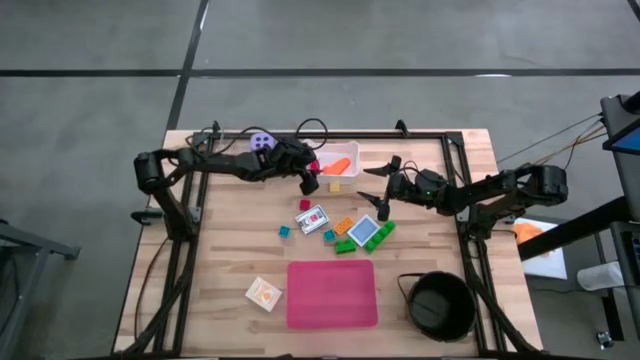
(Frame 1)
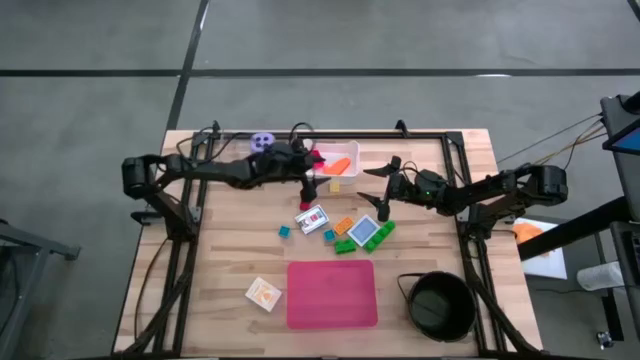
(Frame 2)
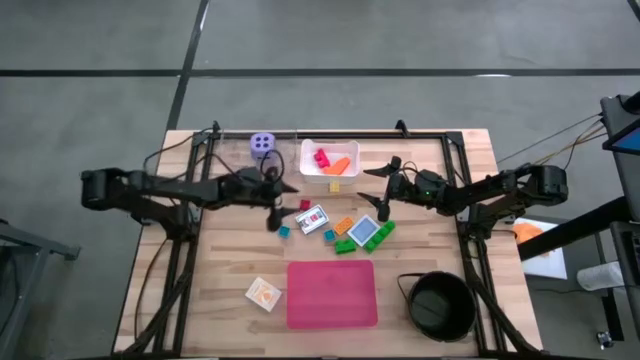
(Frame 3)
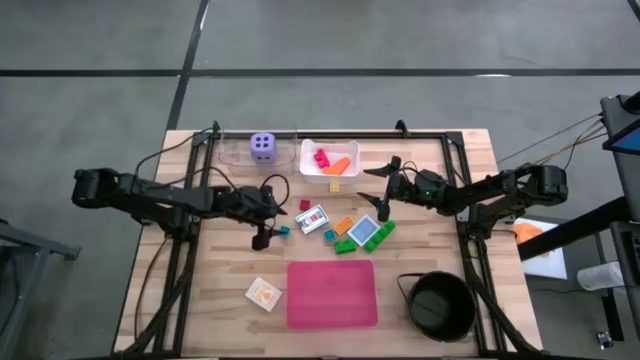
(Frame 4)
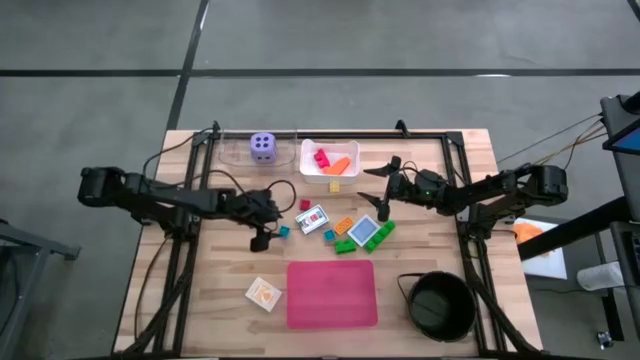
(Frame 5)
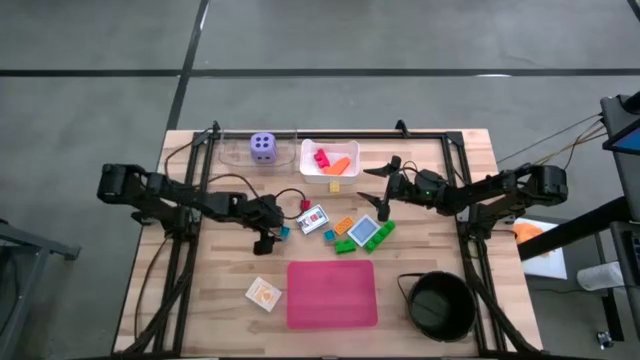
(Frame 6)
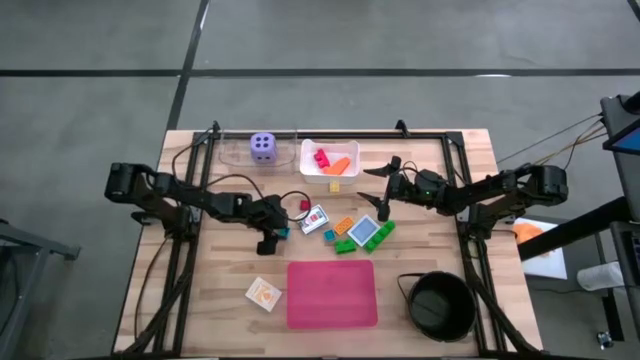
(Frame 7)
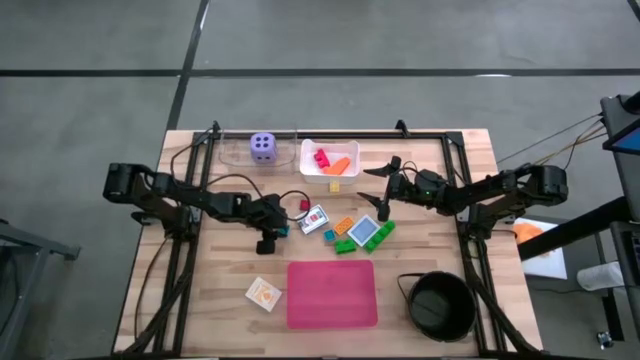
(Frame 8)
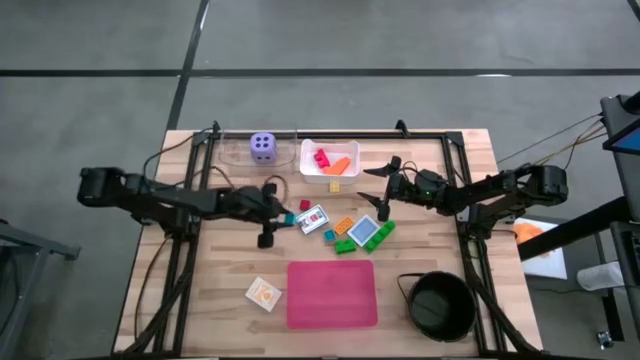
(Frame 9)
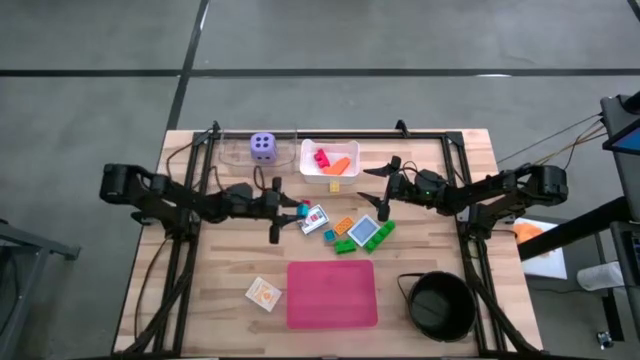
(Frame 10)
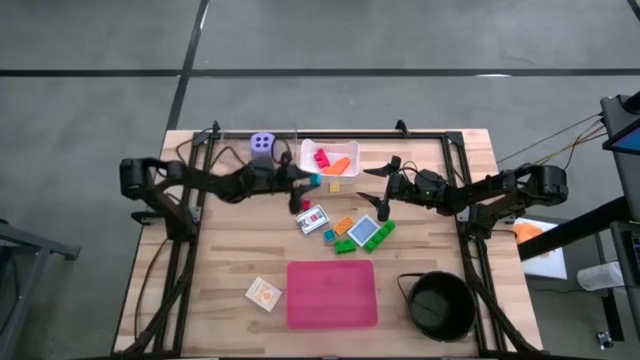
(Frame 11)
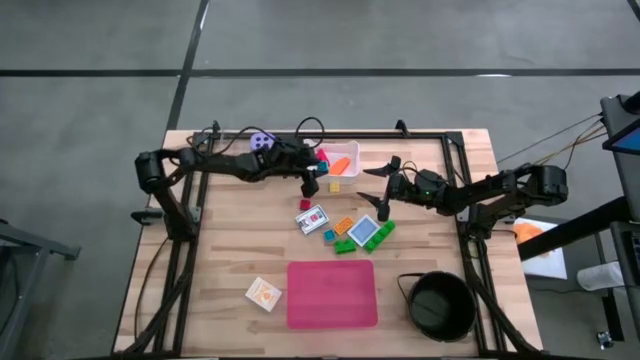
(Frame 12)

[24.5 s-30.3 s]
Task: Pick & Place Toys
Put the left blue four stud game piece into the white bin

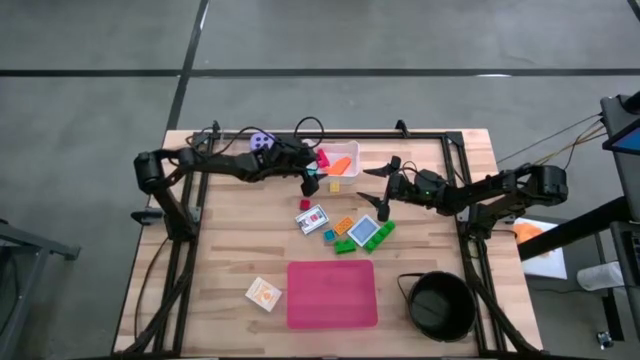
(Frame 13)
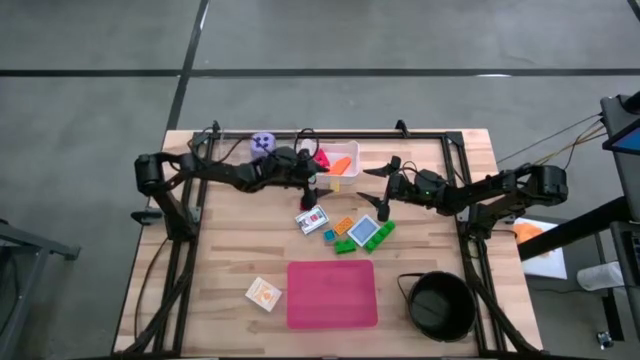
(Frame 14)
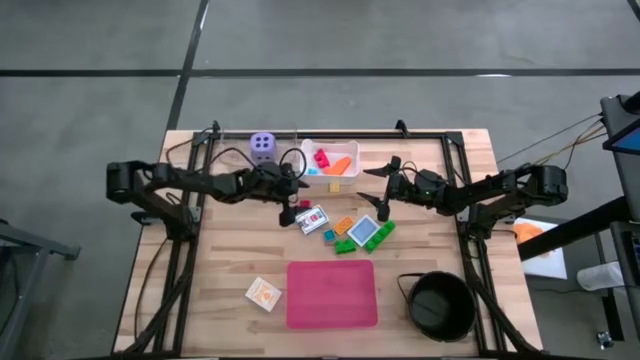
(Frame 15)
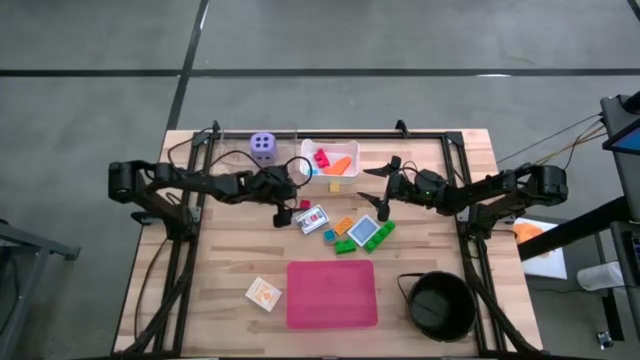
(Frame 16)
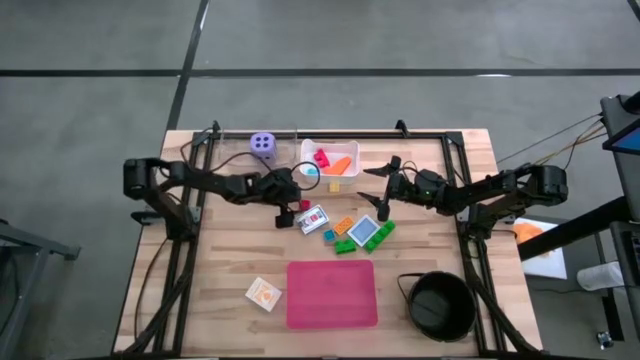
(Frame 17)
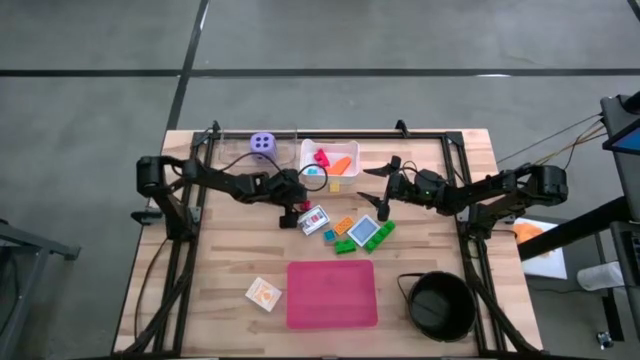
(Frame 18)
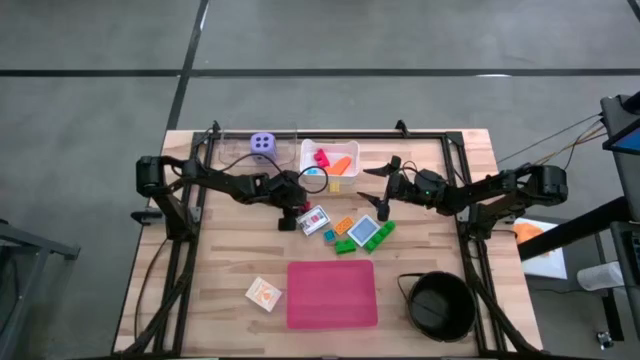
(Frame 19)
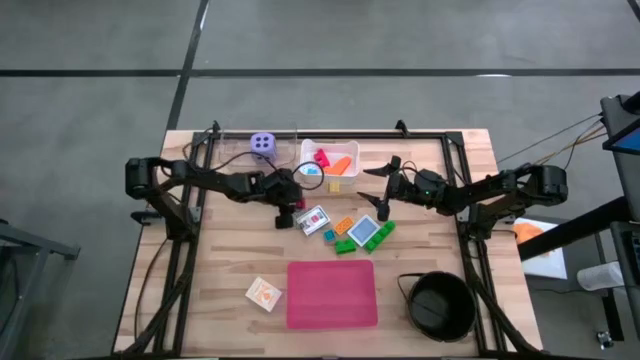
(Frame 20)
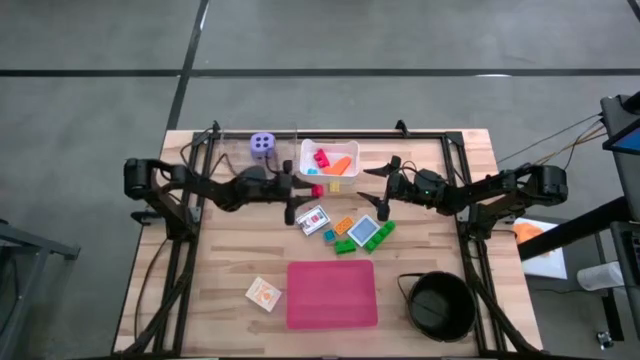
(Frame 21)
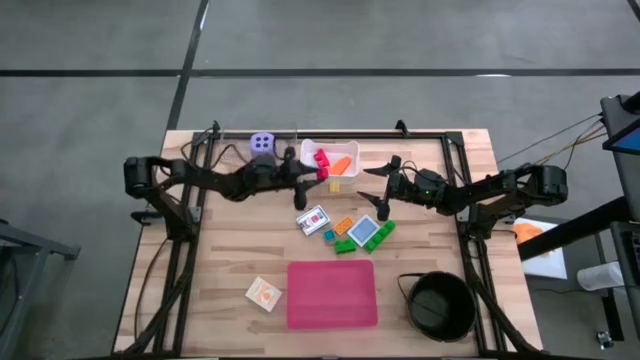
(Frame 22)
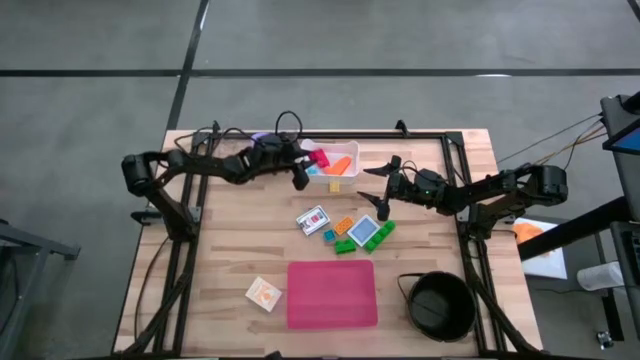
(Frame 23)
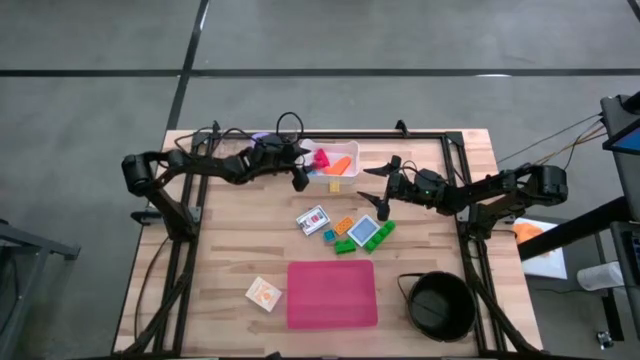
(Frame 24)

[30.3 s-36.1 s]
Put the red four stud game piece into the white bin

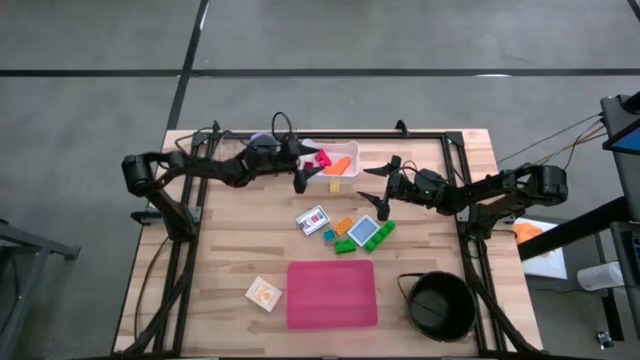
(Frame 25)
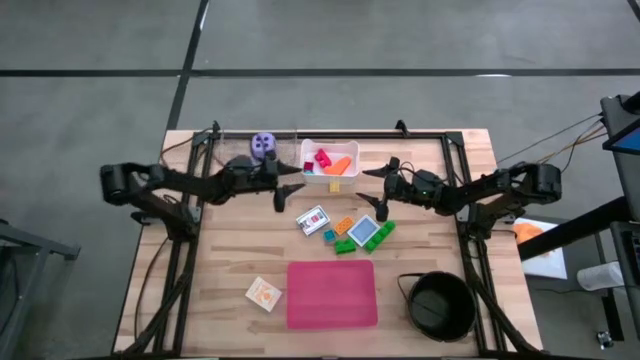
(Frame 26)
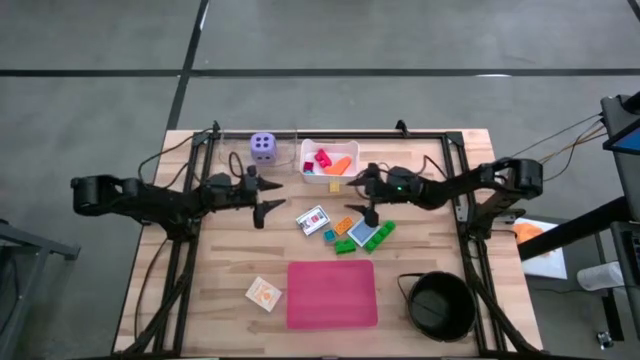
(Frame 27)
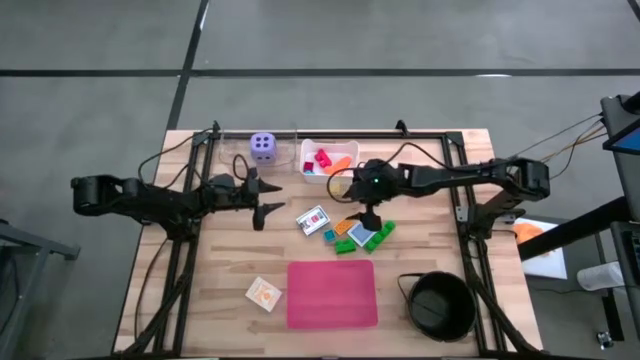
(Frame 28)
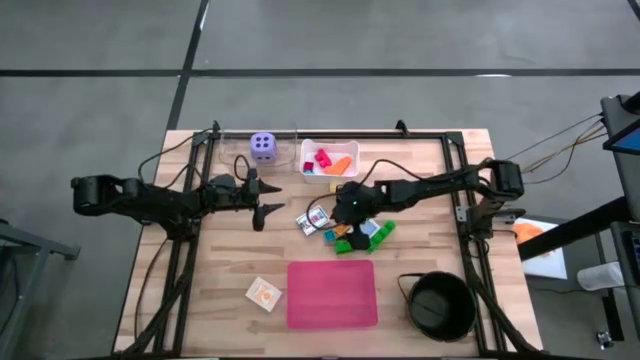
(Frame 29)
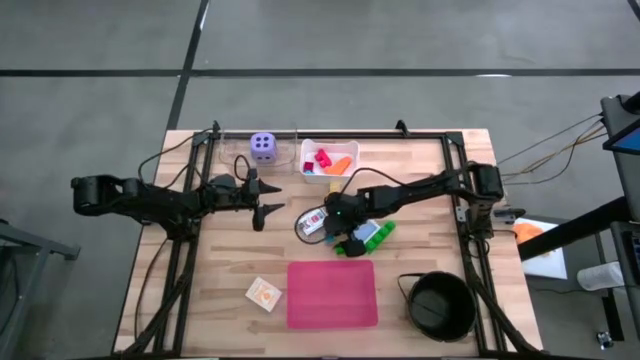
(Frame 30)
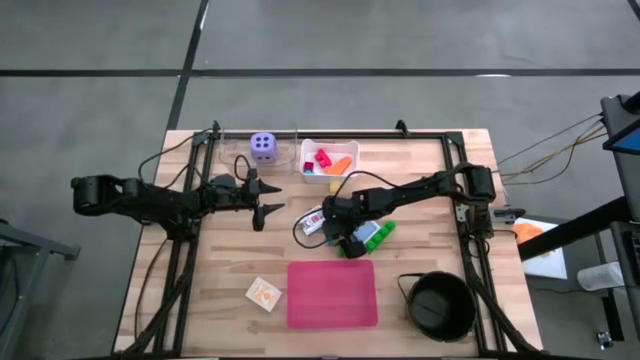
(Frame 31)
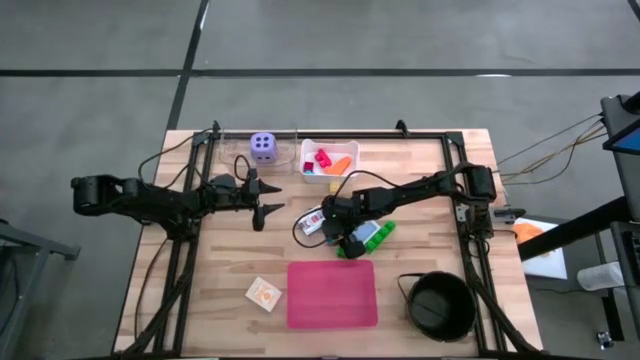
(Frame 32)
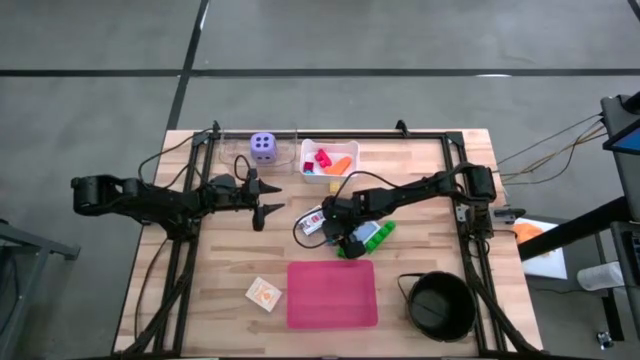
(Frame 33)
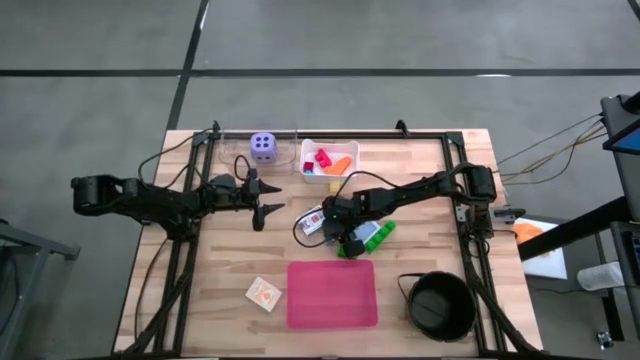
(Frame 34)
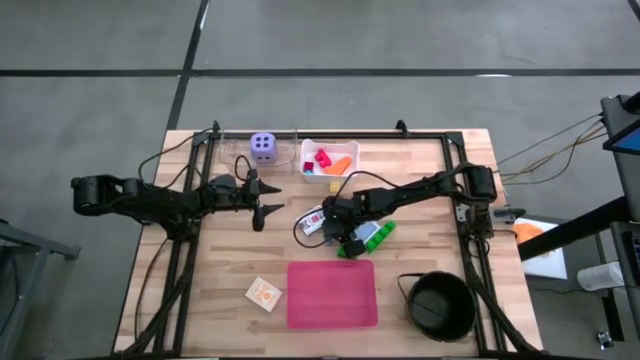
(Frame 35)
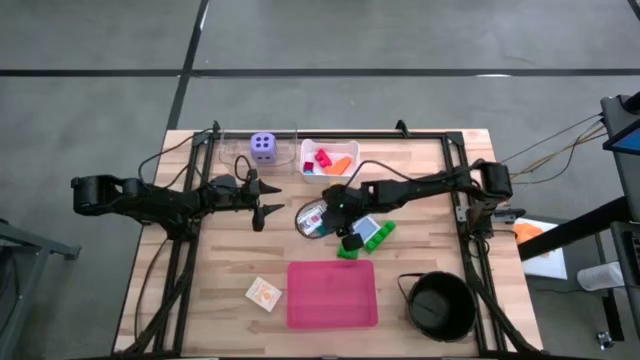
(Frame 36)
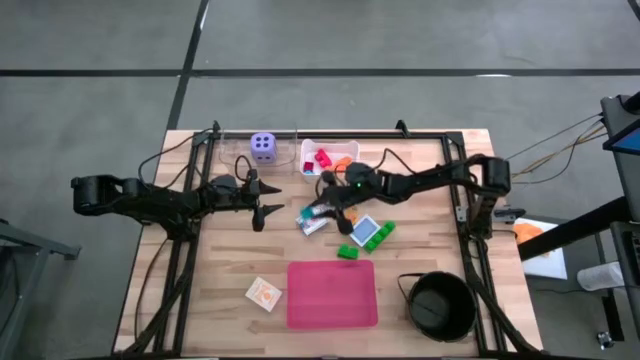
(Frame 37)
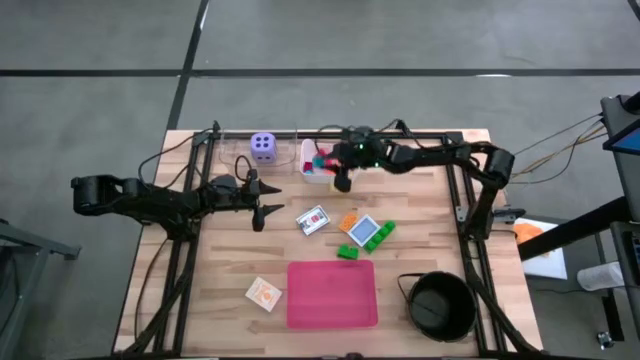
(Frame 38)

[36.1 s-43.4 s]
Put the blue four stud game piece into the white bin

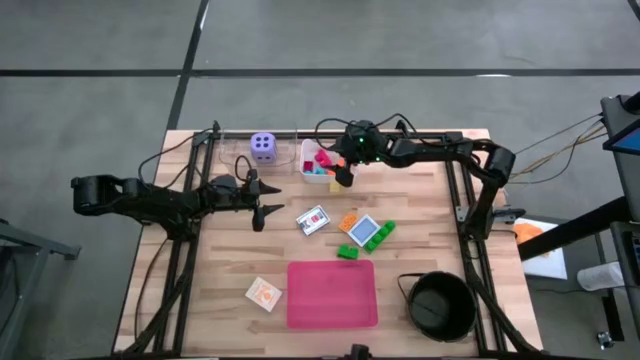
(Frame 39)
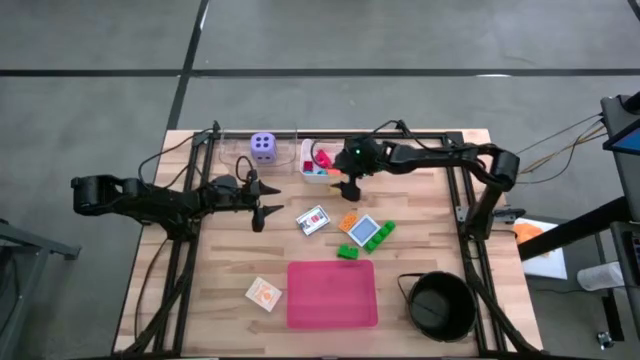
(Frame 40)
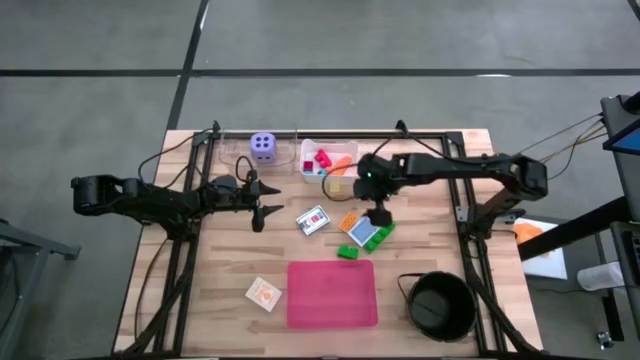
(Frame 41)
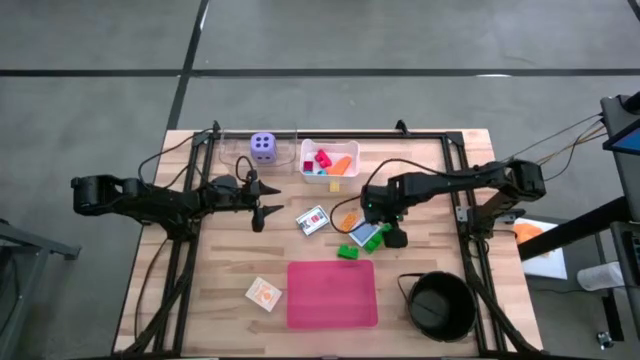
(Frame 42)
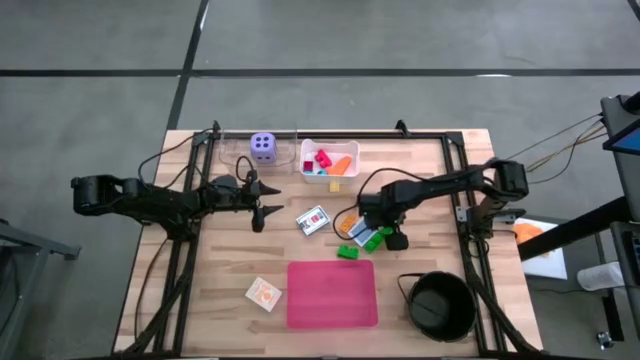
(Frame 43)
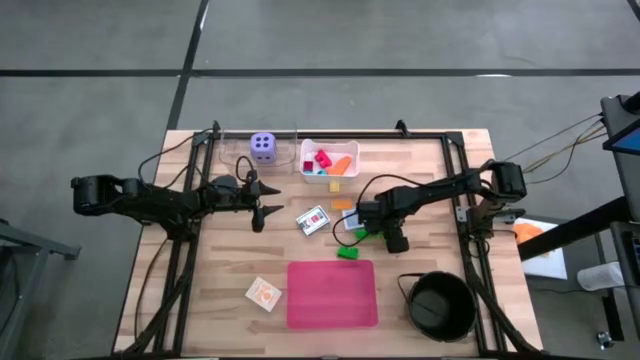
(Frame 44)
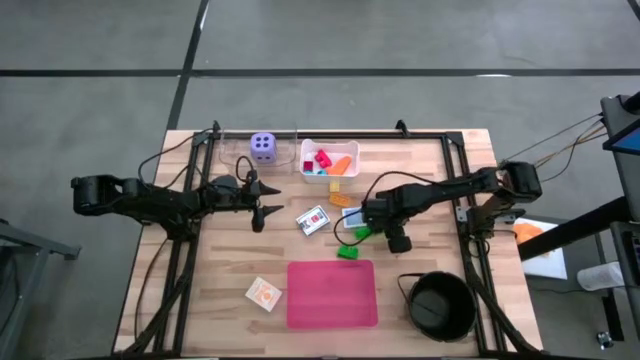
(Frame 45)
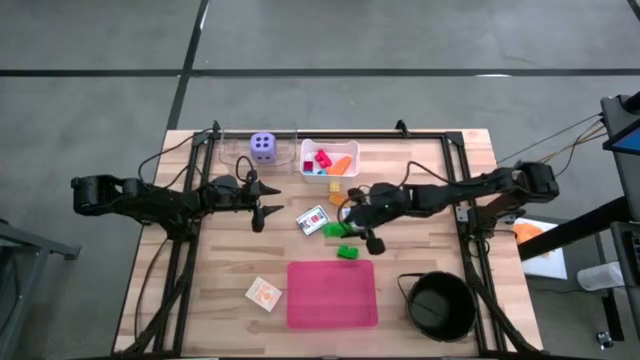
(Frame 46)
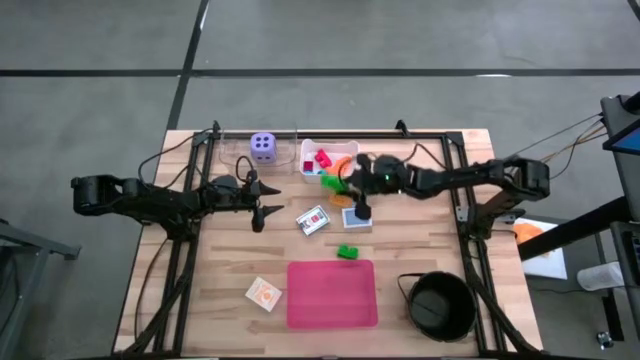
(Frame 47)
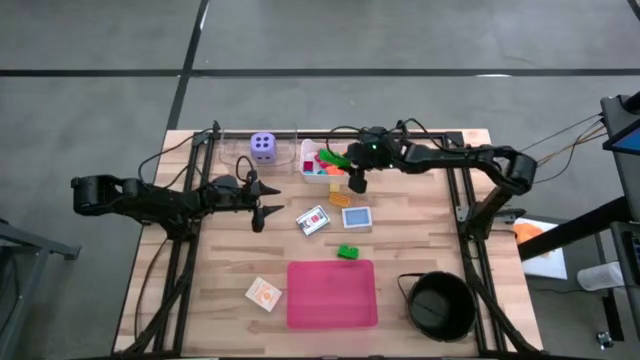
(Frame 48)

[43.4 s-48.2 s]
Put the green four stud game piece into the white bin
